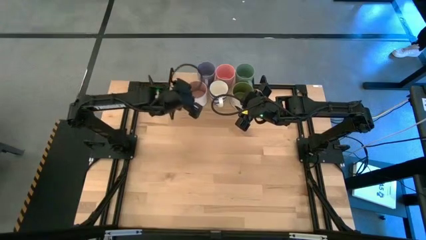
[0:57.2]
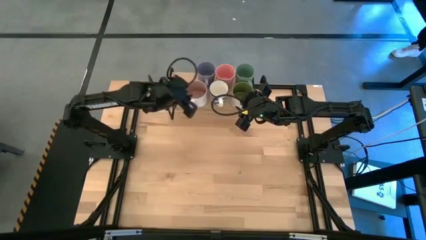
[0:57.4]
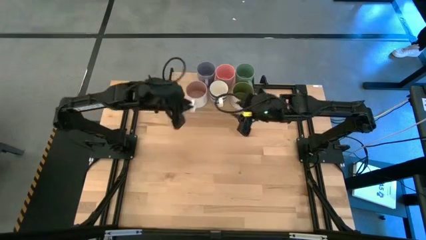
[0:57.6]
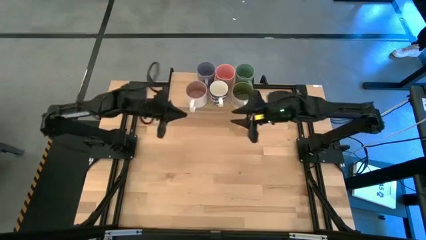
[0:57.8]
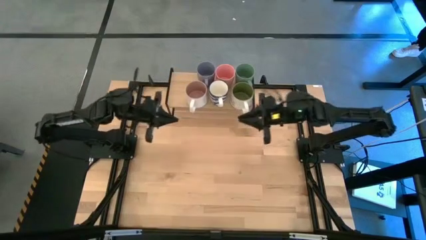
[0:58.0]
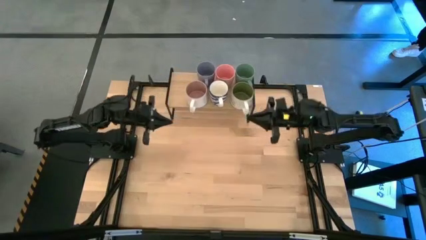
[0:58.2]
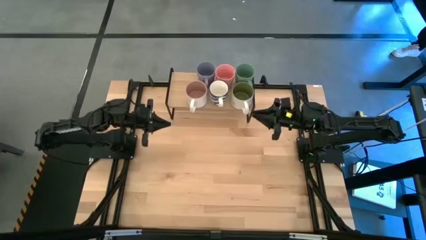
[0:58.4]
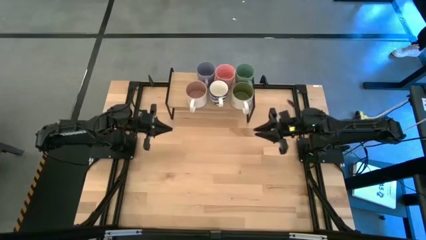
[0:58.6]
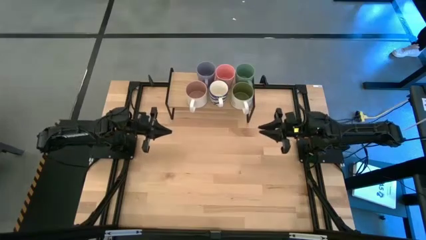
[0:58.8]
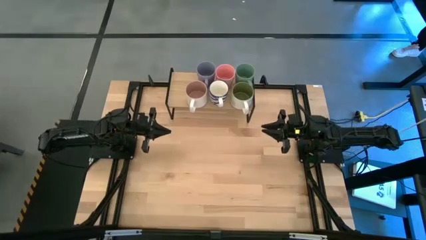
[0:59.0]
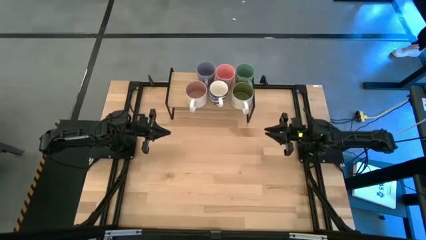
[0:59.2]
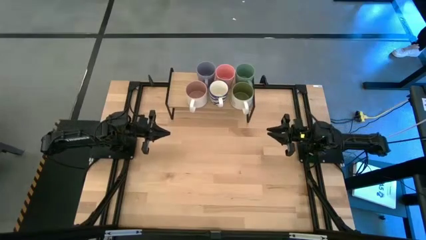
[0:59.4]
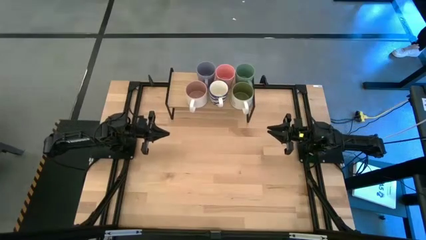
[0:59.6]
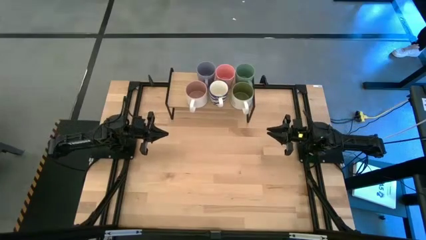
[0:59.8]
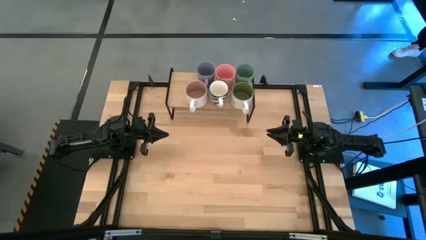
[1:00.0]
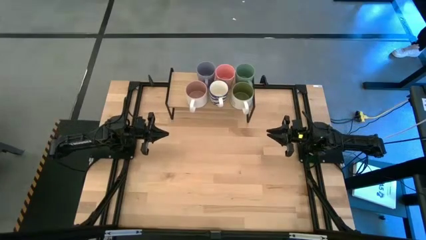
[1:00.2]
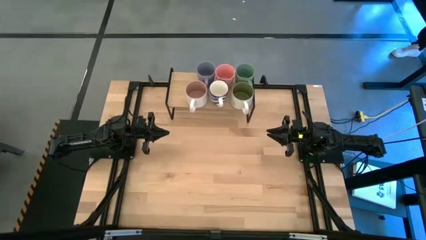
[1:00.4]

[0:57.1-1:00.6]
Task: Place coffee mugs
Return to Home Position

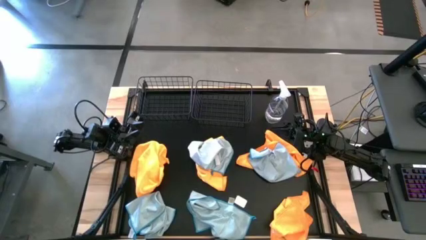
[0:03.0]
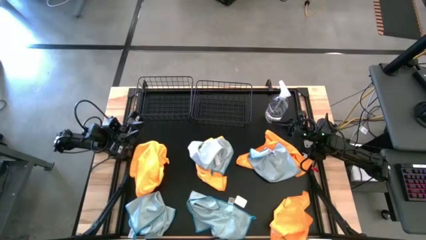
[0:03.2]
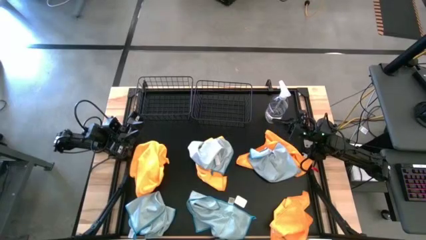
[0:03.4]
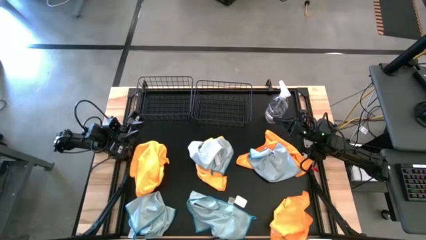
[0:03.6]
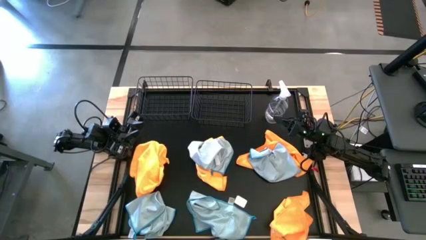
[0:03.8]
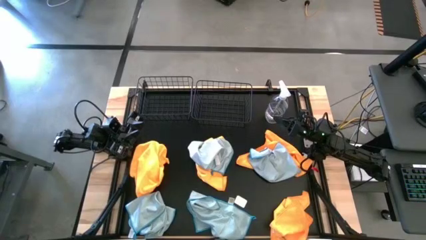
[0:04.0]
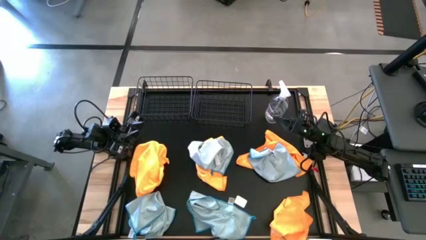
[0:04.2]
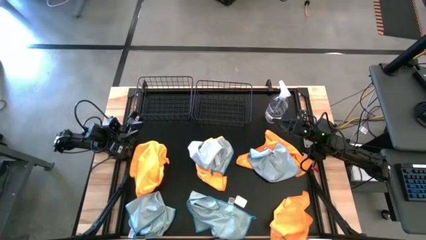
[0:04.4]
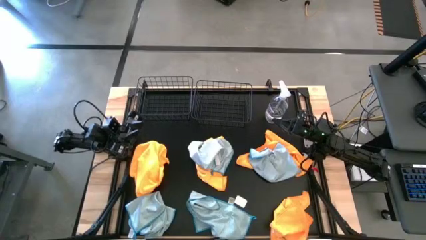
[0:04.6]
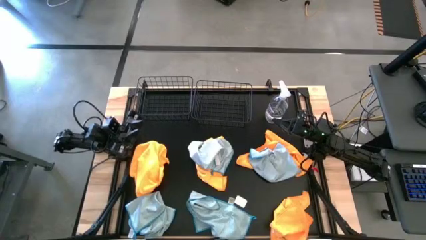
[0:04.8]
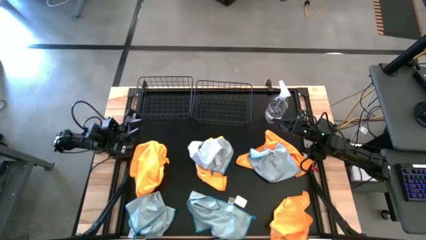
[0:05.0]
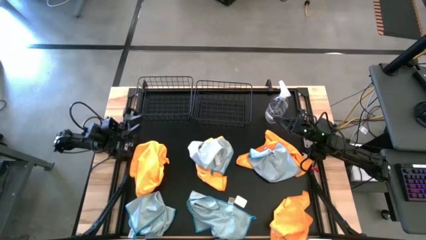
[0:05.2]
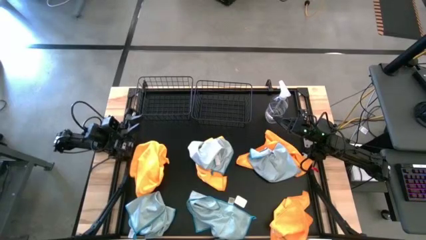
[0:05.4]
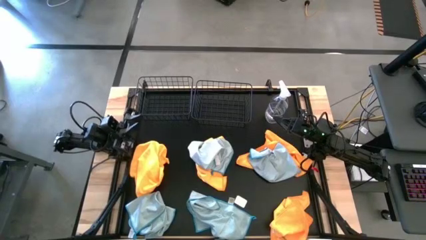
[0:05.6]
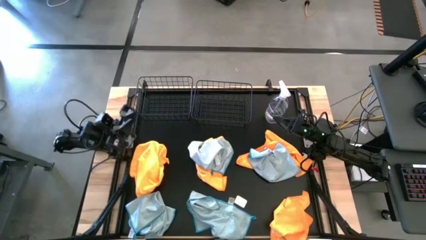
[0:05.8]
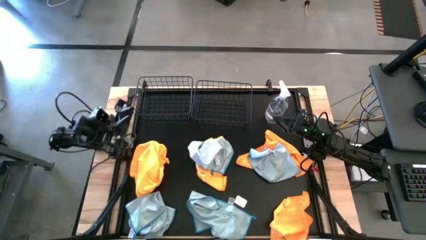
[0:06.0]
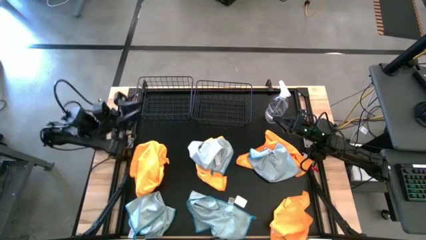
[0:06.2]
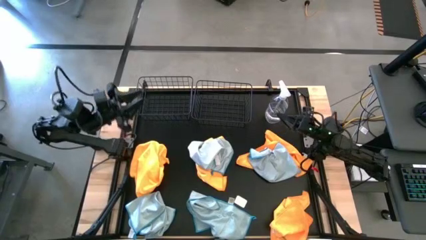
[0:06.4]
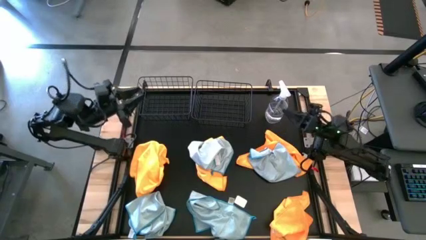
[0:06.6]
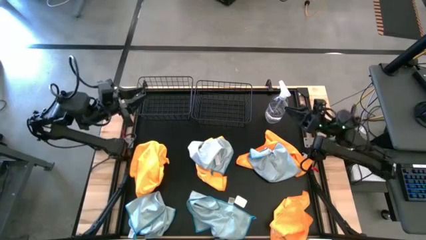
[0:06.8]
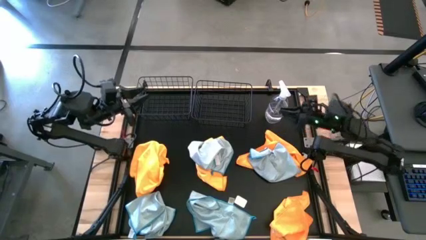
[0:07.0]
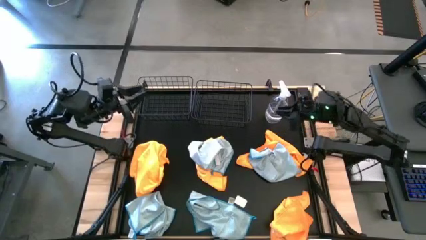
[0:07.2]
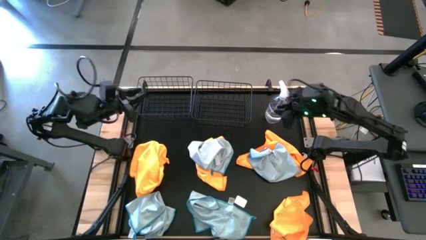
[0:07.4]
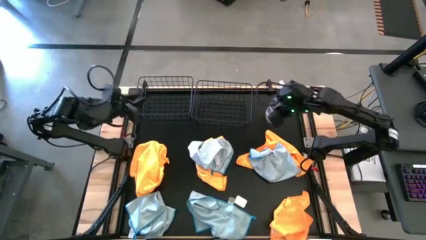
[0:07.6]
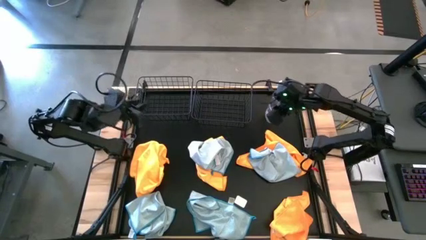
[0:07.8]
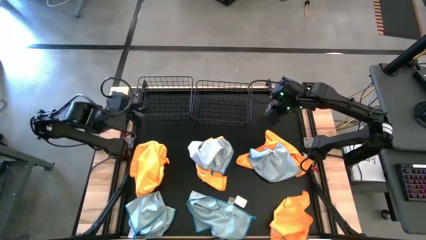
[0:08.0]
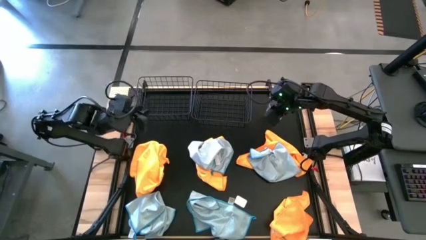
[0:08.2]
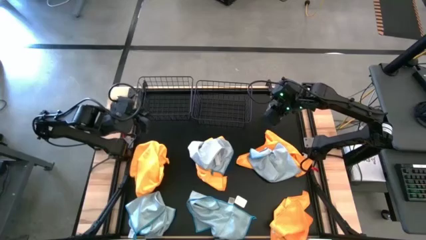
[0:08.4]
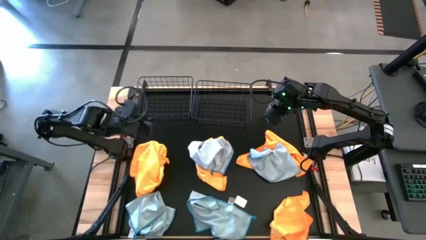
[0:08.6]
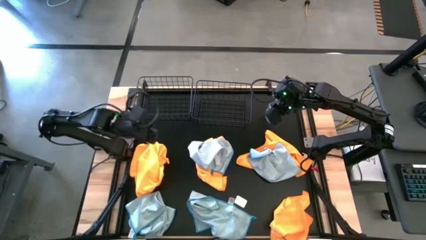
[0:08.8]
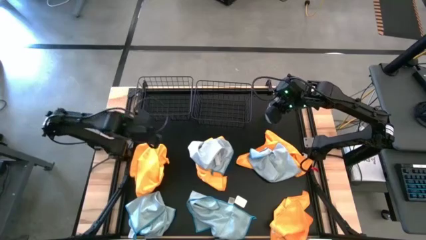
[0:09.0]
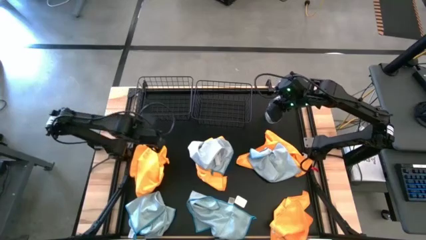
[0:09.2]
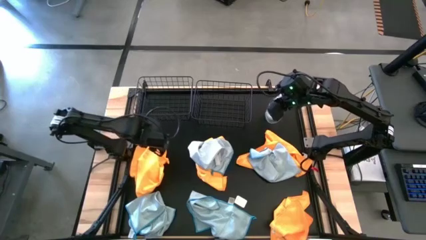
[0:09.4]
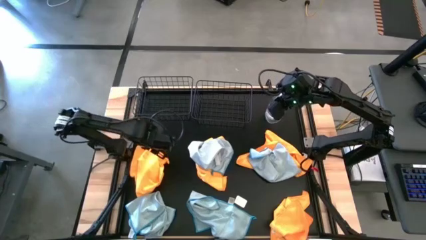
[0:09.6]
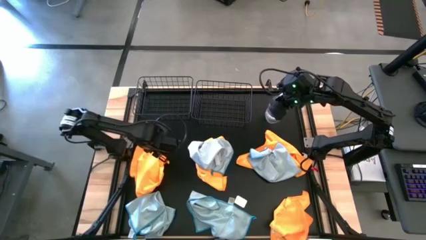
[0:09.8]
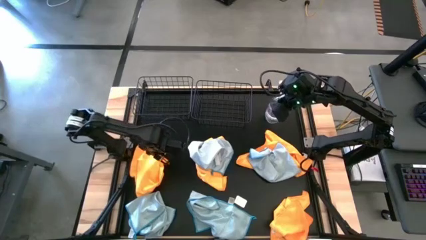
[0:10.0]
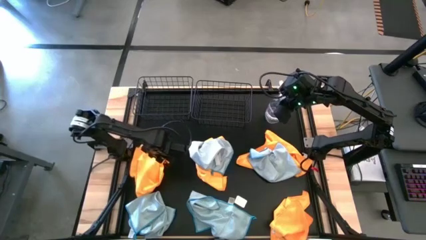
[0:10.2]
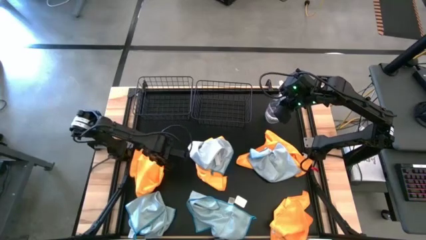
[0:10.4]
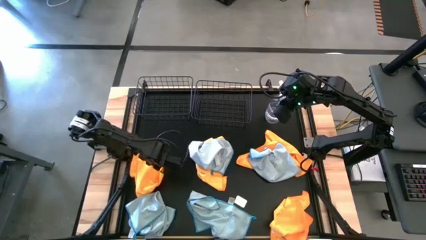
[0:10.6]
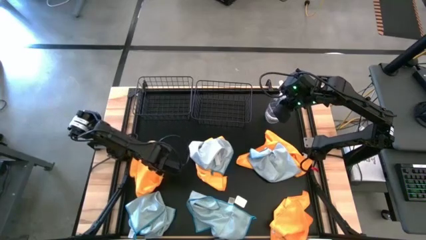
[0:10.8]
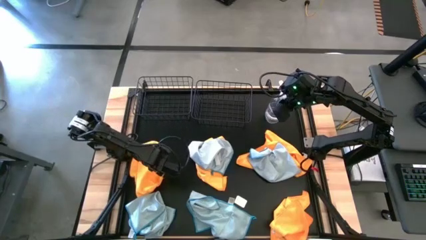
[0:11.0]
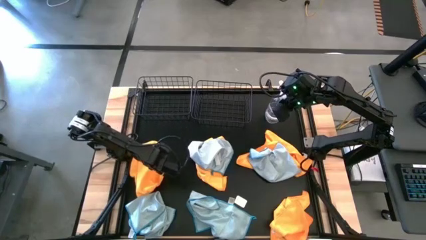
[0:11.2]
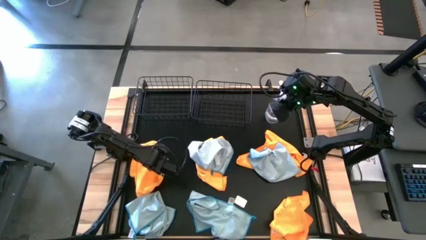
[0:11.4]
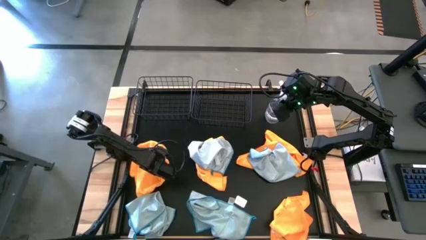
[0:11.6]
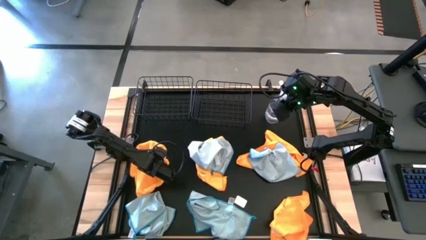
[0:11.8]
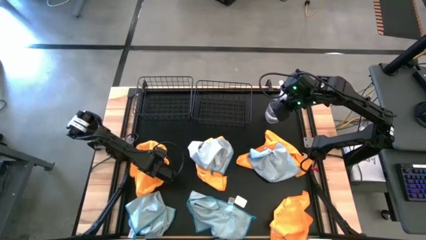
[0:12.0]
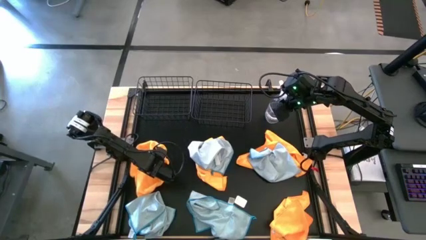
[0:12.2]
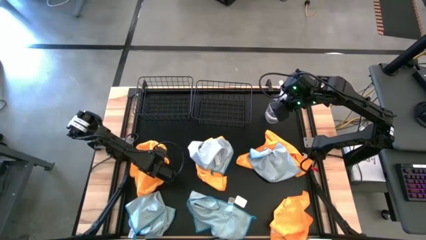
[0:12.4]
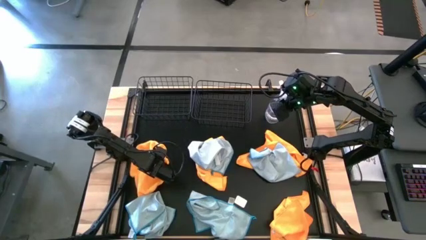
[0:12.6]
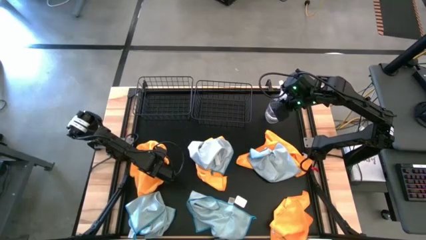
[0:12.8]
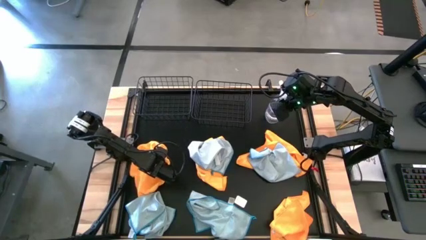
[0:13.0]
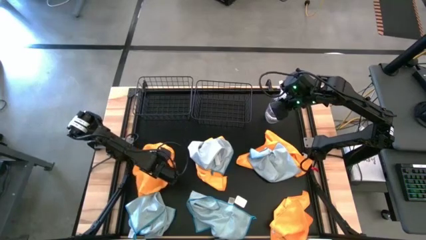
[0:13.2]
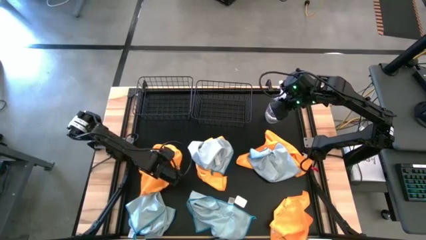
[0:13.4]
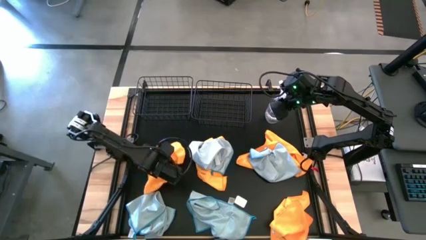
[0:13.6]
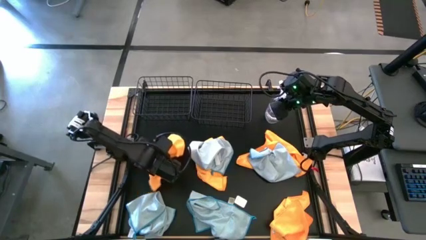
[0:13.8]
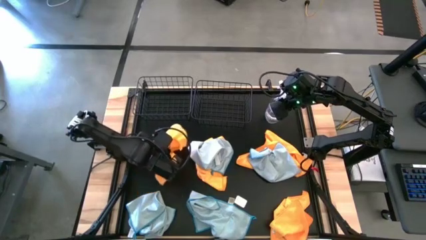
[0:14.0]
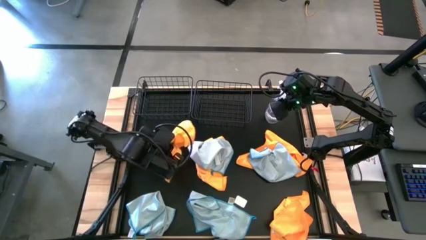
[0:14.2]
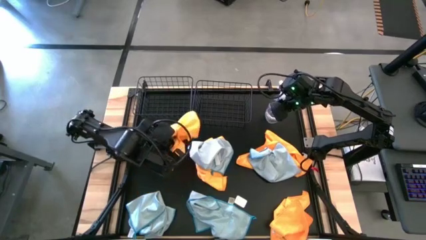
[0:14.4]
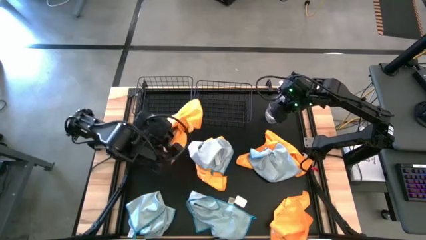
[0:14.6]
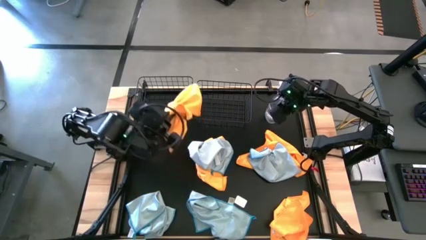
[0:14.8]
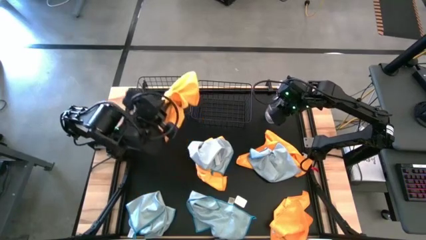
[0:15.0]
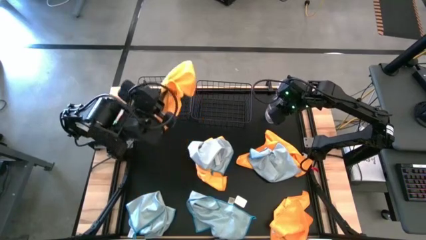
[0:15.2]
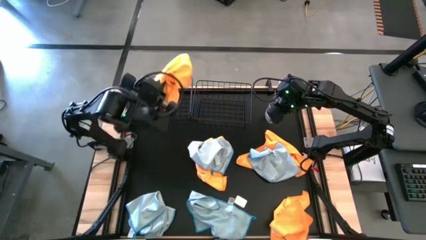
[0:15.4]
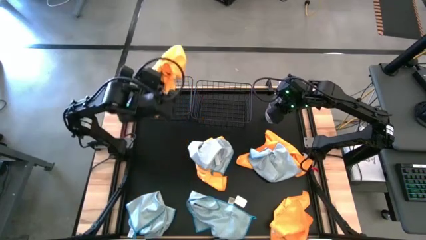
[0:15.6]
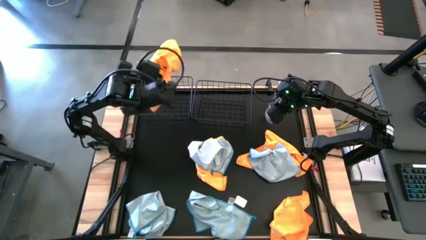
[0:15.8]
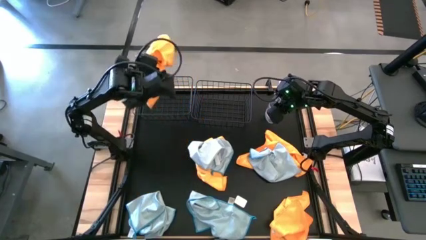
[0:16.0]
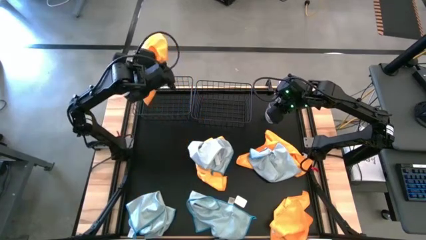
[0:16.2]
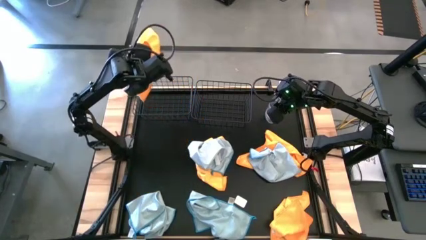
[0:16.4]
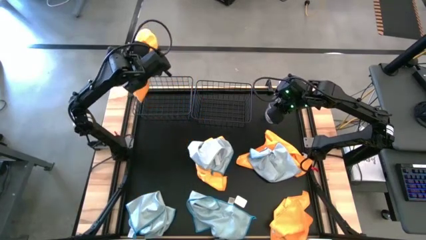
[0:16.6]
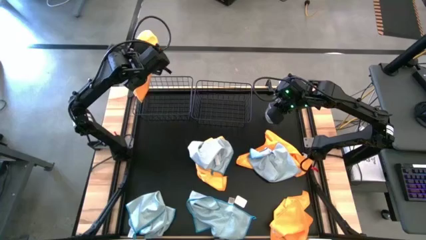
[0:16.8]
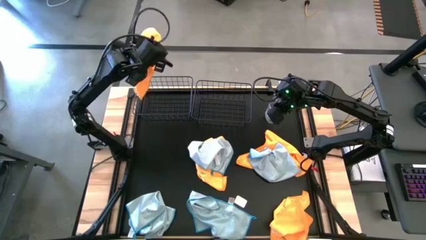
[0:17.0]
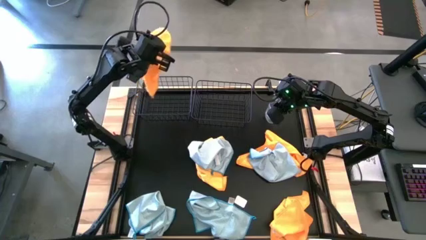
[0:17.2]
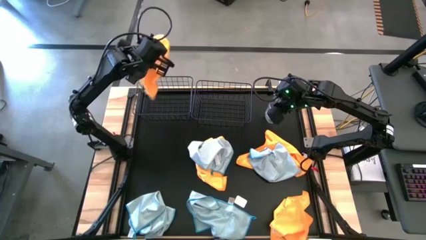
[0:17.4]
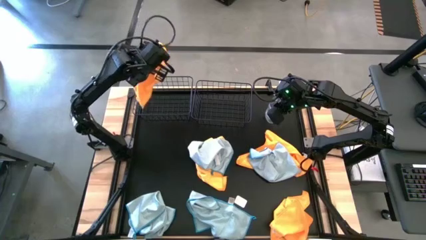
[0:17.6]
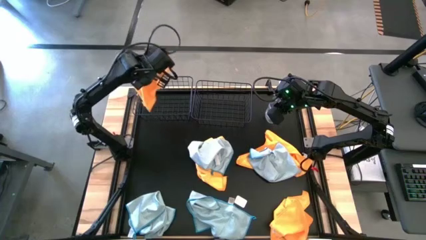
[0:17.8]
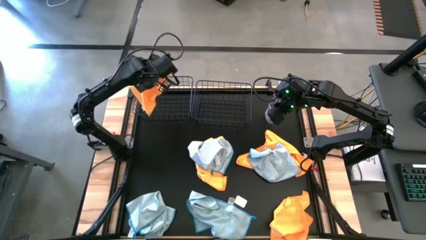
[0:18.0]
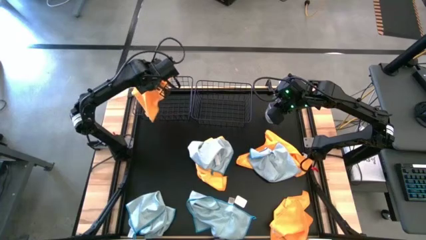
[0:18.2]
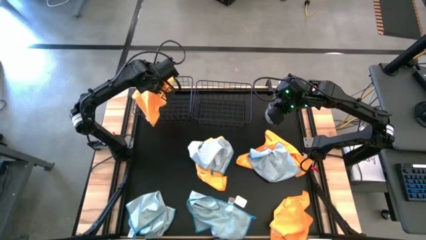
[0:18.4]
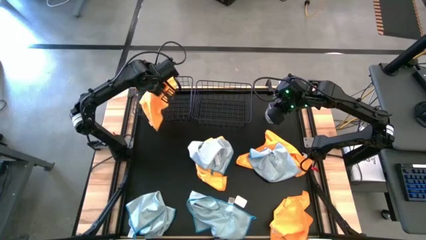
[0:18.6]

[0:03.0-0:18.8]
Task: Sort microfiber towel by color & place in baskets
Put the yellow microfiber cloth into the left black wire basket
